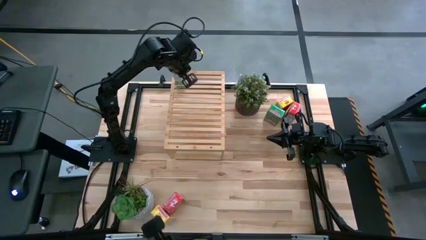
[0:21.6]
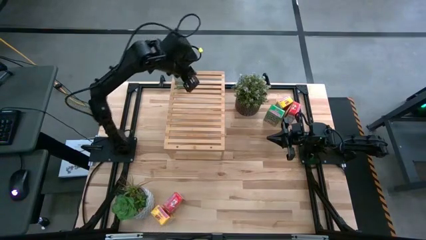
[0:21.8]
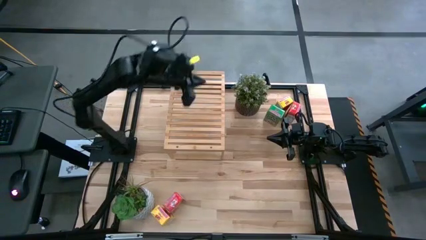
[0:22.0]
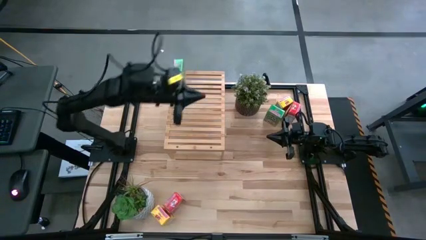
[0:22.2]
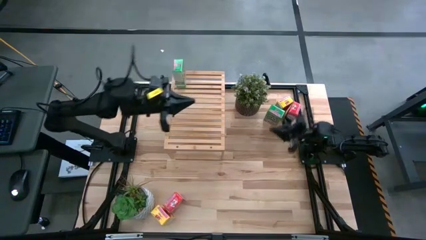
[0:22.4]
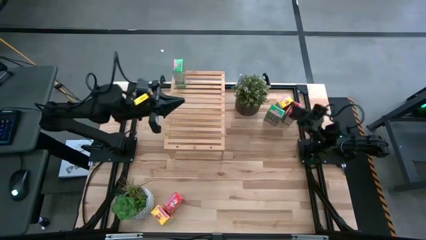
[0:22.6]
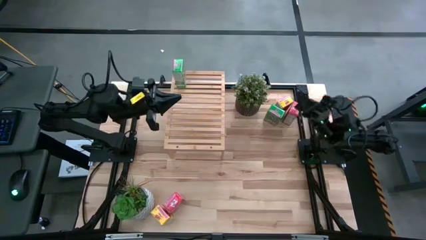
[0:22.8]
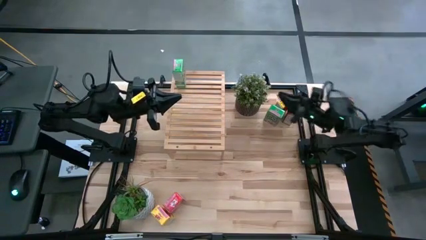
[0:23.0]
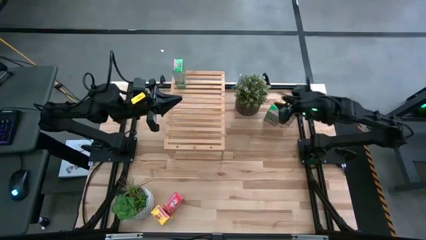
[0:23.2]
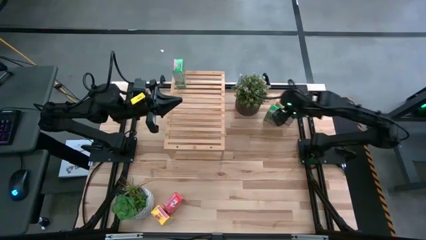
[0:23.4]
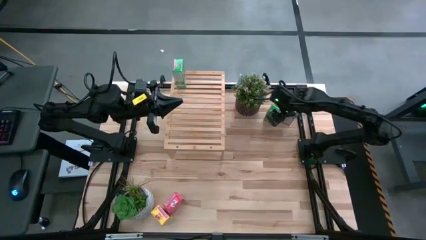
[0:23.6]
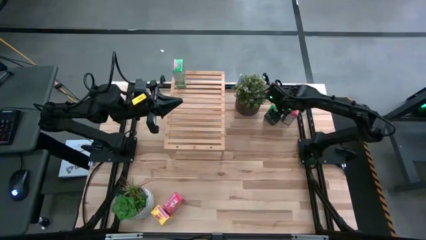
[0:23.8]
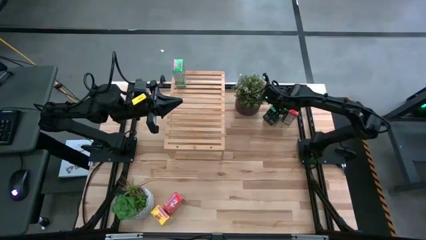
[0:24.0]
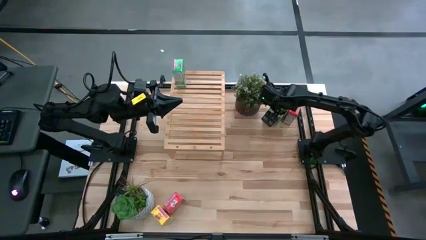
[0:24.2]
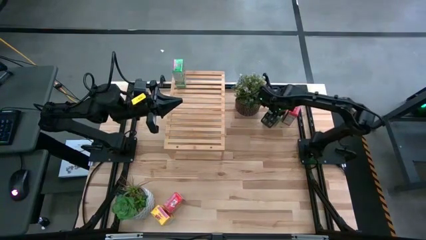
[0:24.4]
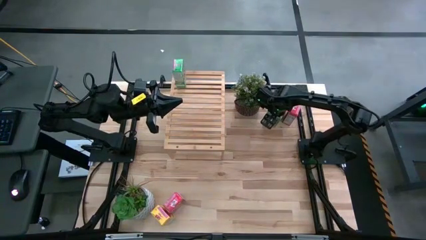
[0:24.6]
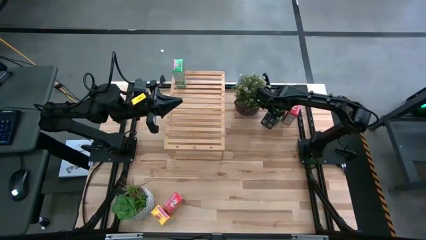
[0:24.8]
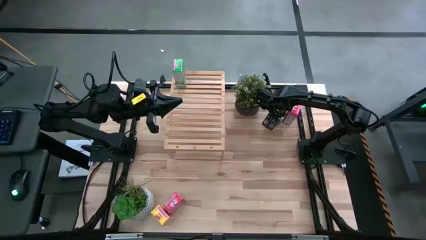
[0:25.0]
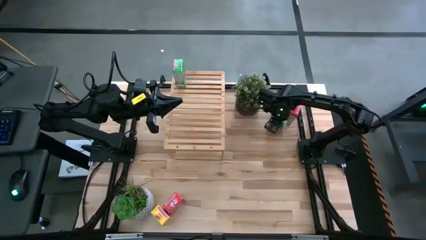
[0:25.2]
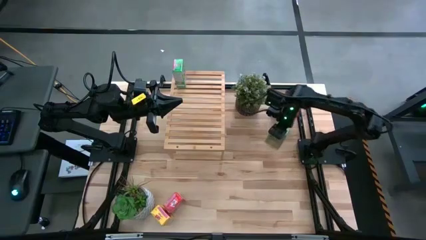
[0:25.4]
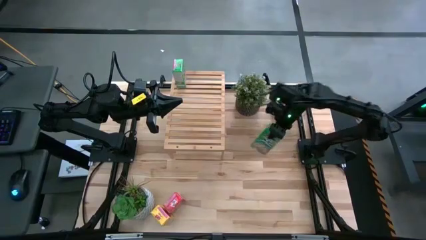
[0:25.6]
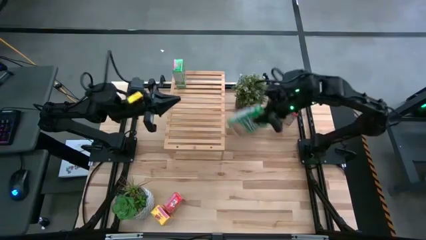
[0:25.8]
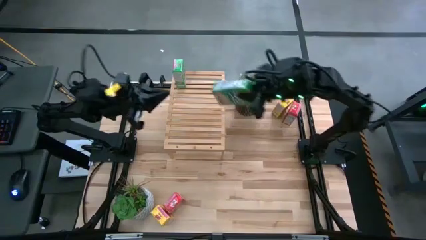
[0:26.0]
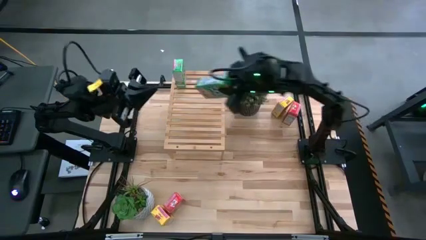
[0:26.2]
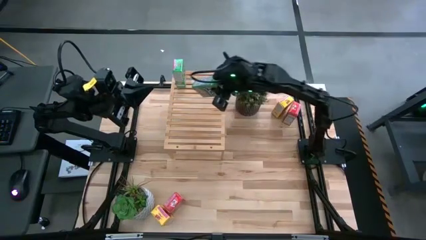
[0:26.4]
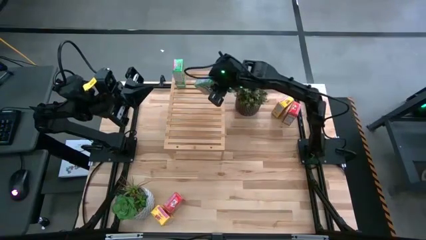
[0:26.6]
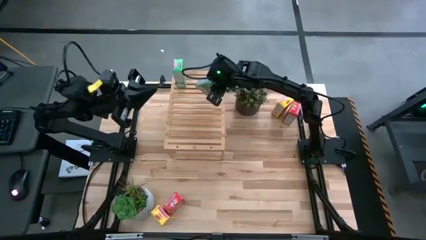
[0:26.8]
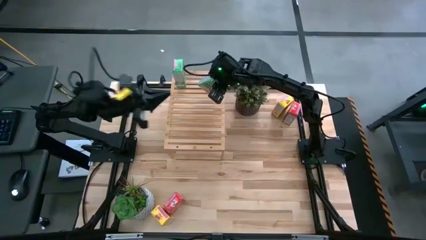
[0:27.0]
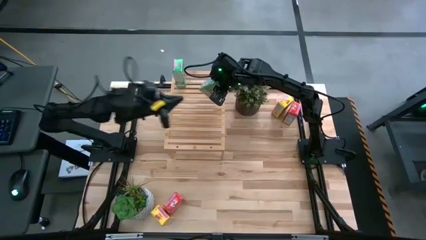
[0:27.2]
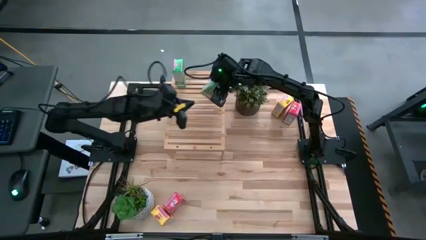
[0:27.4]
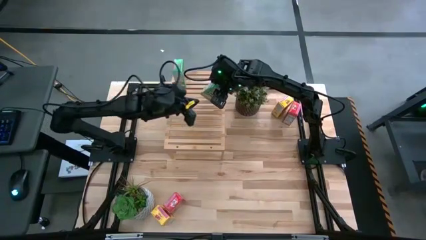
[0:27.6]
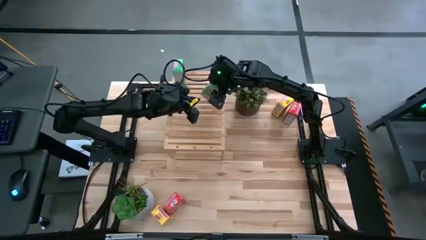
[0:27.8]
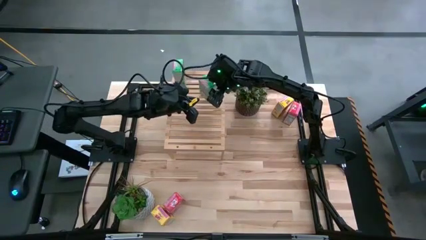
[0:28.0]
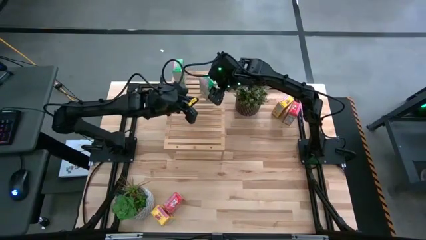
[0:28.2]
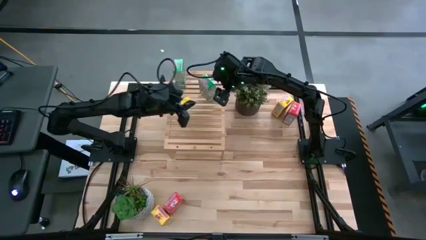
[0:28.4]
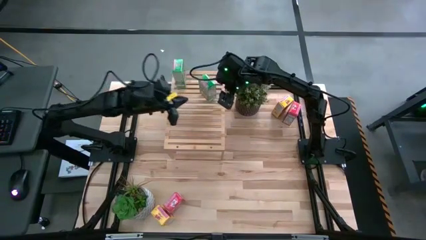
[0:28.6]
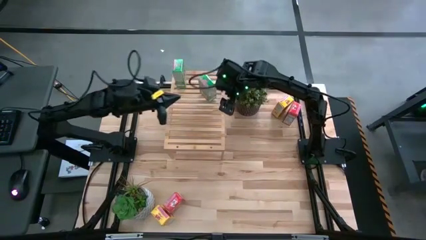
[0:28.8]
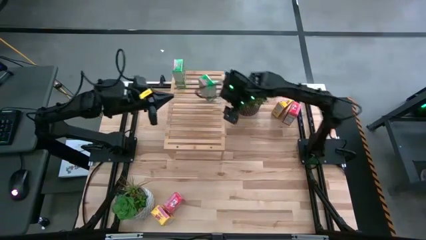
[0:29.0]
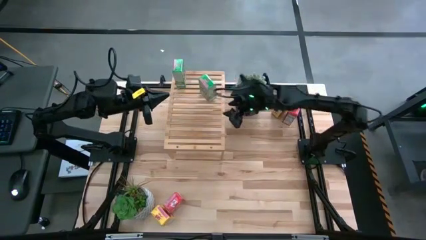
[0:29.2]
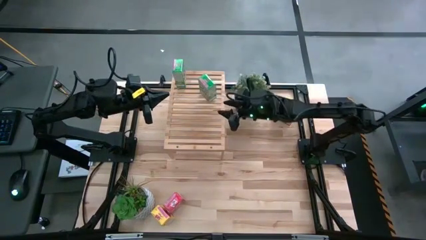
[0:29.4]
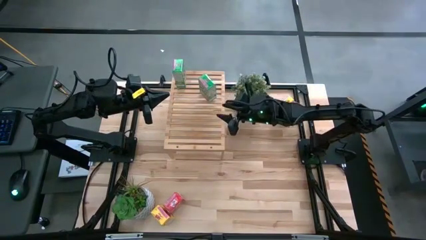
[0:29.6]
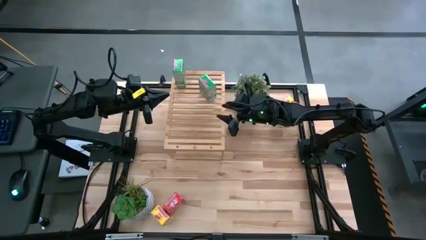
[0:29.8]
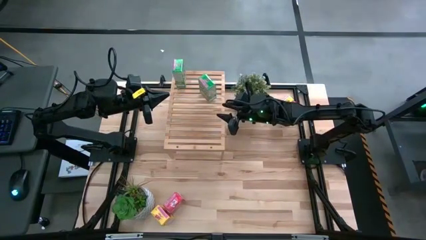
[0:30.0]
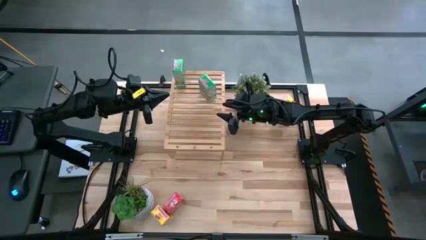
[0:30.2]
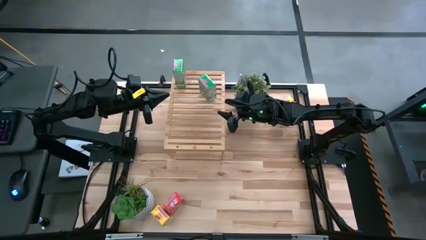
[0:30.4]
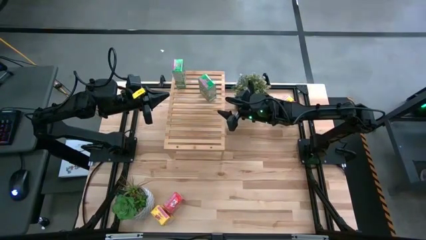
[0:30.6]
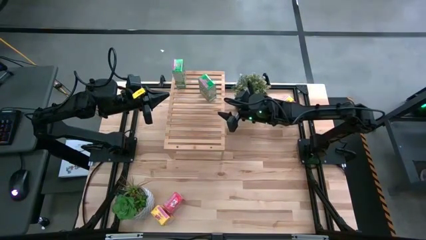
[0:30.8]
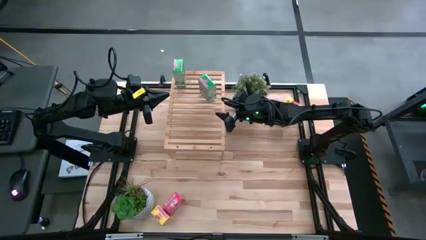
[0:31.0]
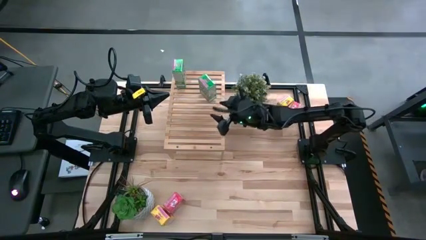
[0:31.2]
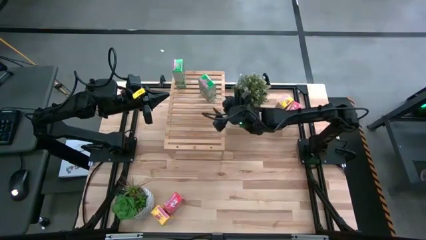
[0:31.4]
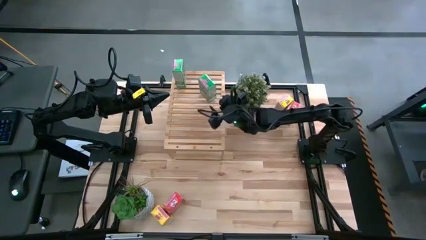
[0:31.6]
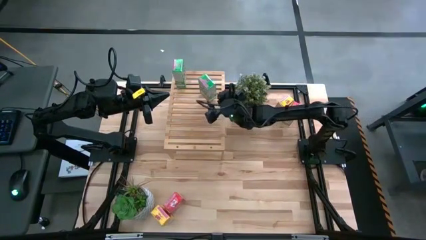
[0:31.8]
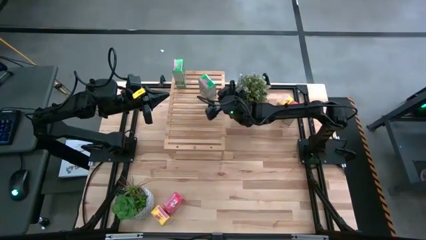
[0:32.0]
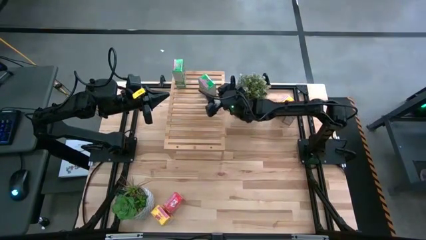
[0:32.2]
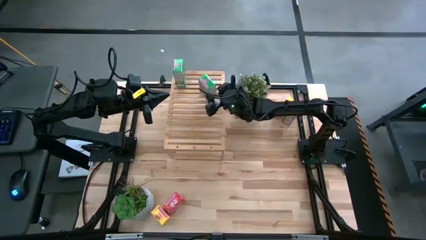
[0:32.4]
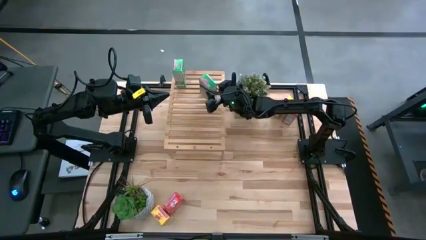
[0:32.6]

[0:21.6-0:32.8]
Task: Stack cereal on shelf
Put the green cereal box on the shelf aligned with the other green cereal box
